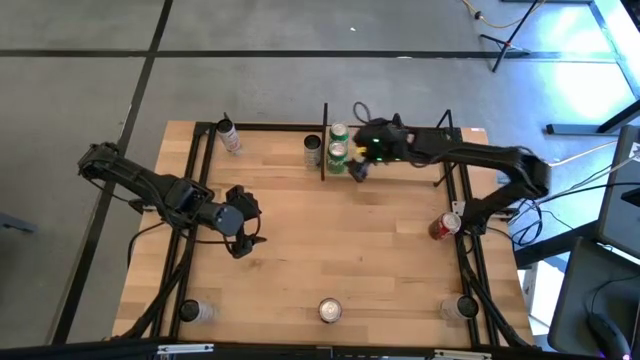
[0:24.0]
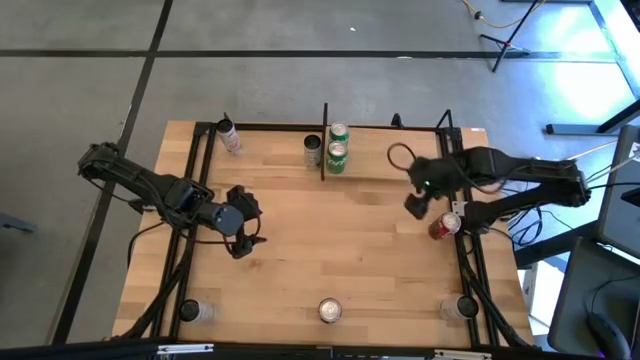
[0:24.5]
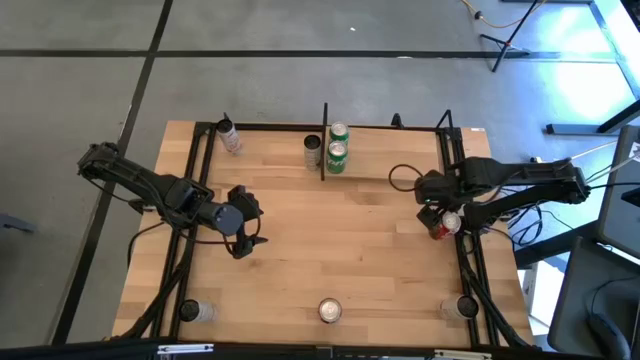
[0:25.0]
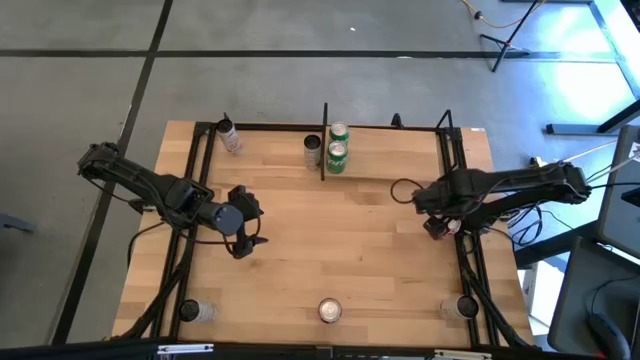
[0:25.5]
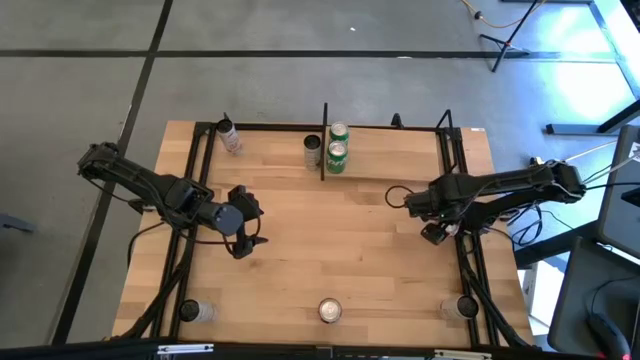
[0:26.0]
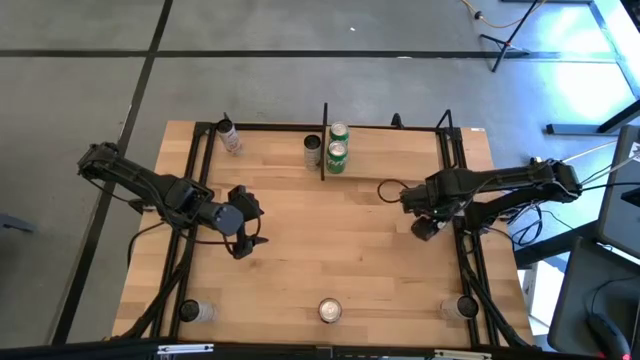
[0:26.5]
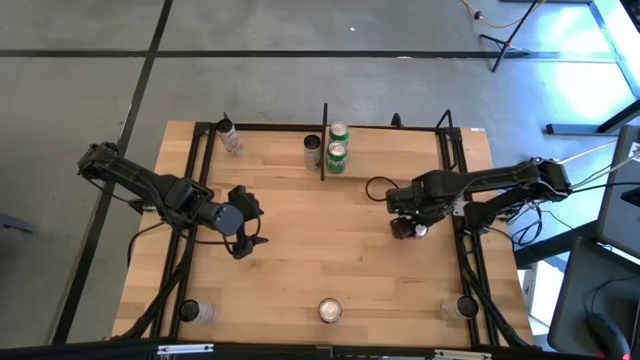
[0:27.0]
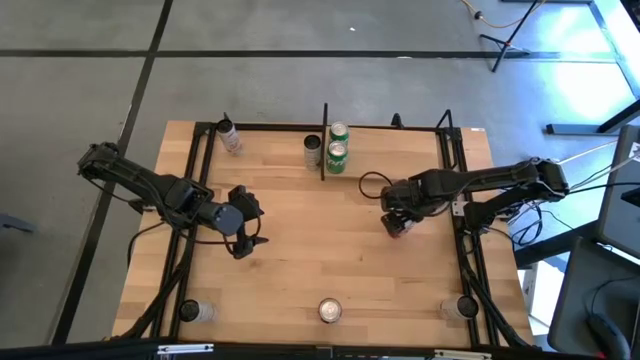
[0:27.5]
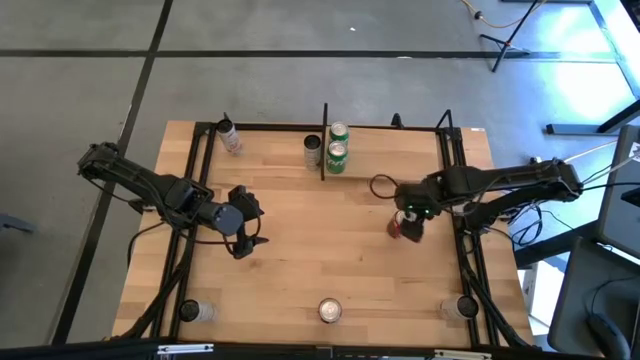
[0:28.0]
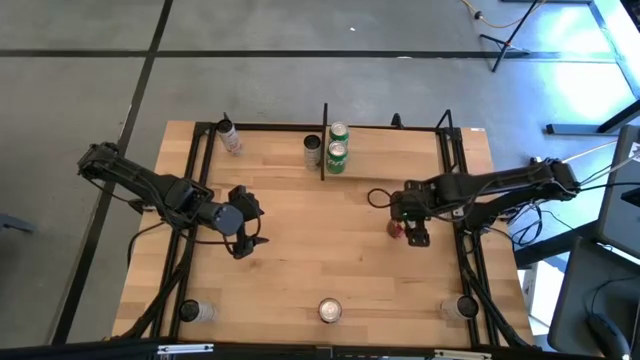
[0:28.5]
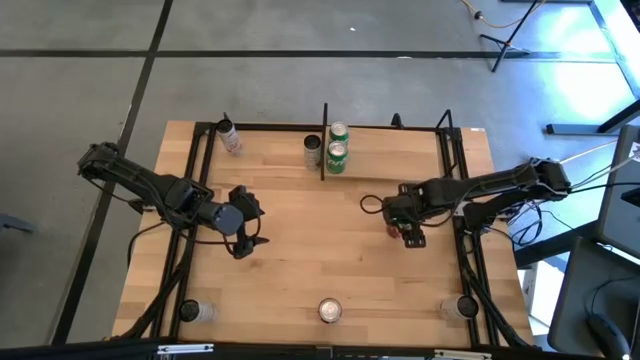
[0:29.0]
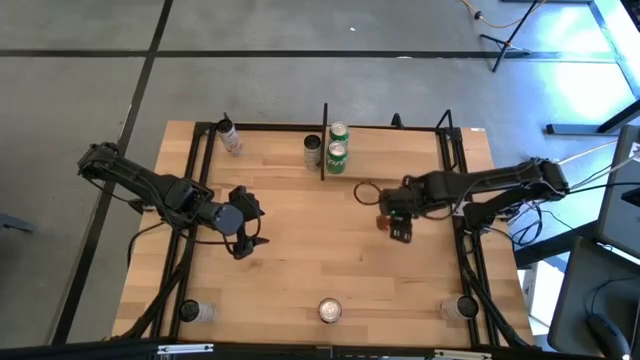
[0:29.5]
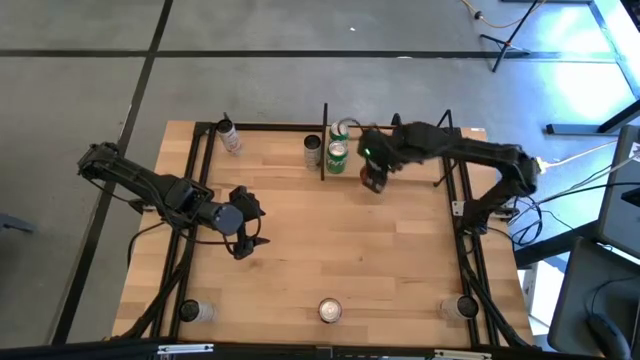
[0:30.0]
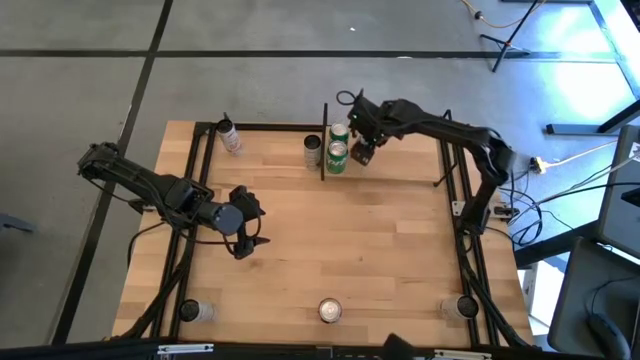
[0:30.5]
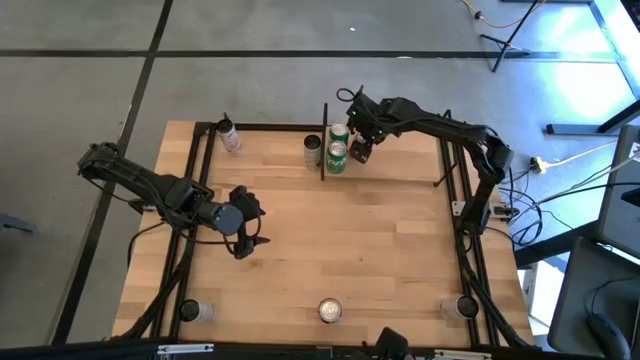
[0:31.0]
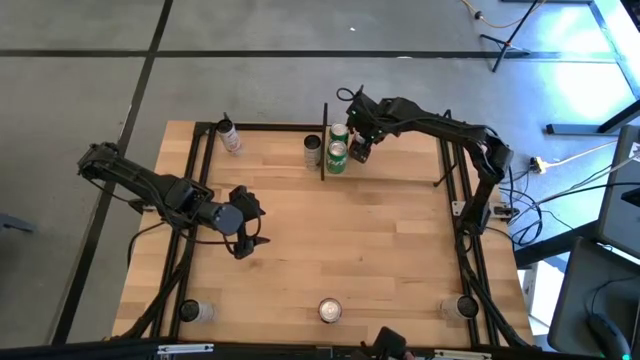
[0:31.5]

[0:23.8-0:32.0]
Task: Place canned beverage on shelf
Put the top red soda can on the shelf

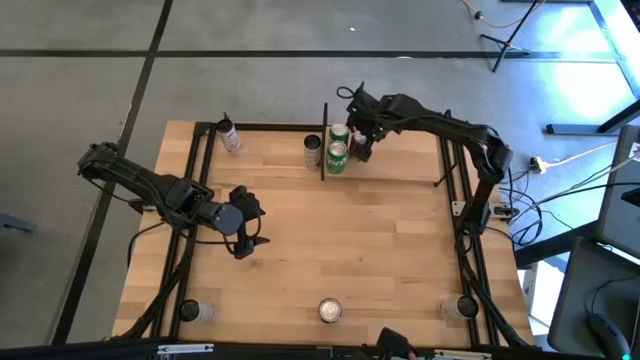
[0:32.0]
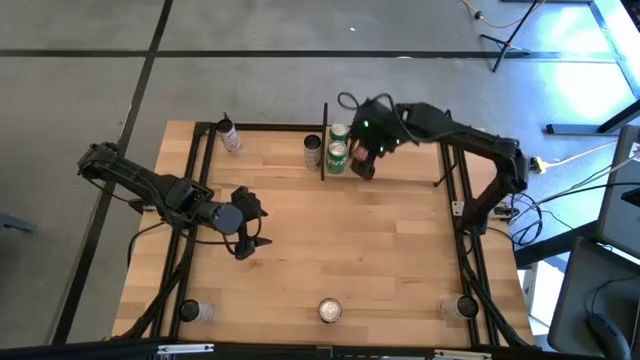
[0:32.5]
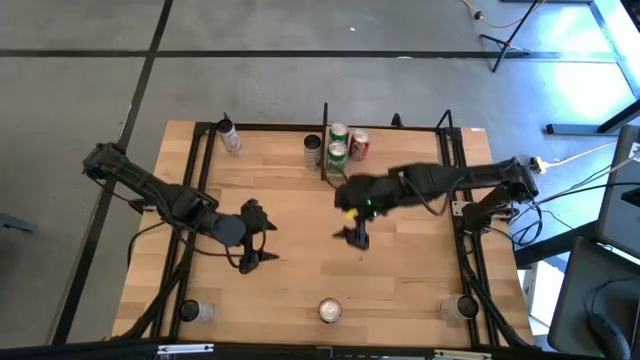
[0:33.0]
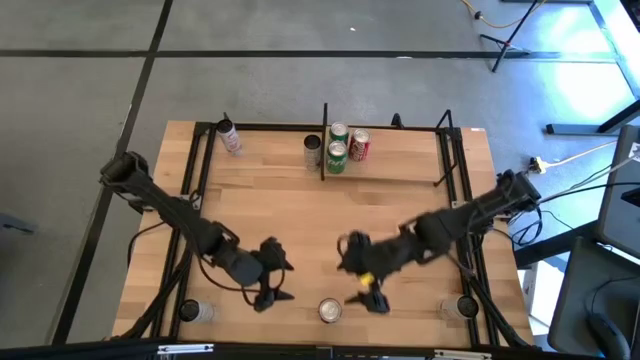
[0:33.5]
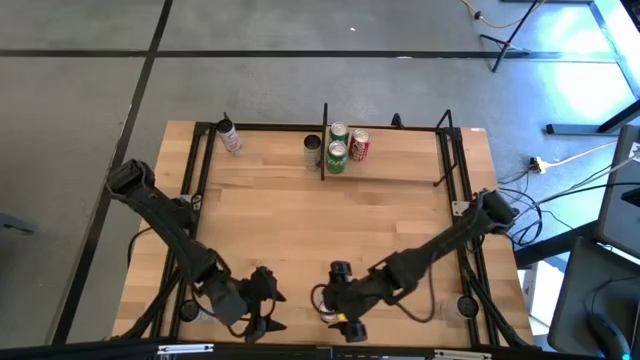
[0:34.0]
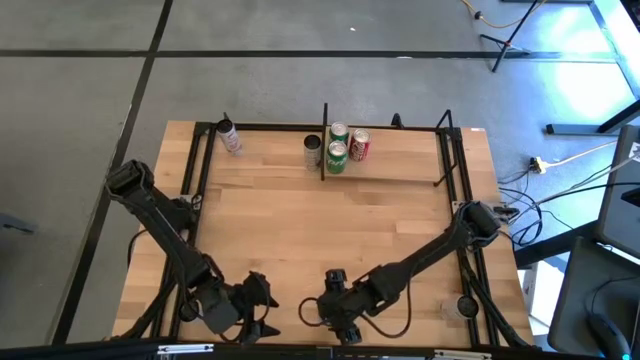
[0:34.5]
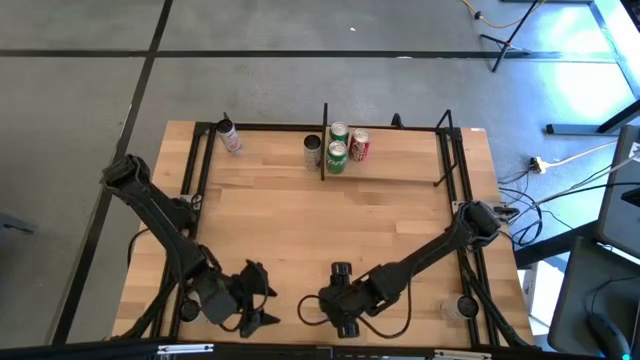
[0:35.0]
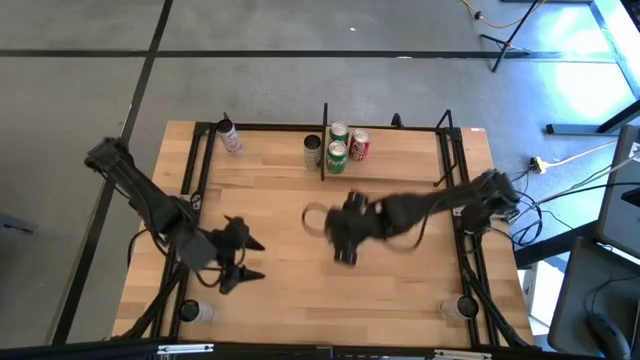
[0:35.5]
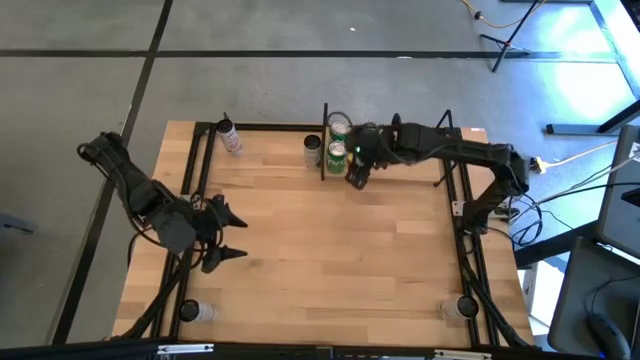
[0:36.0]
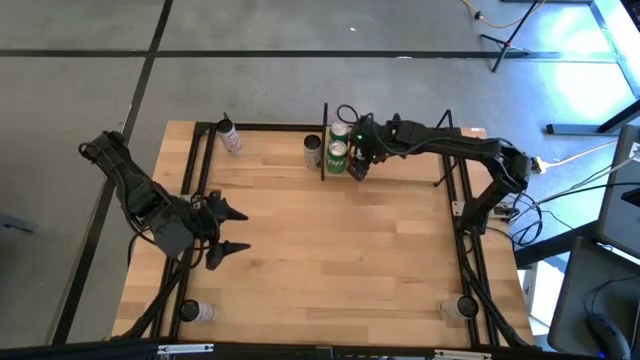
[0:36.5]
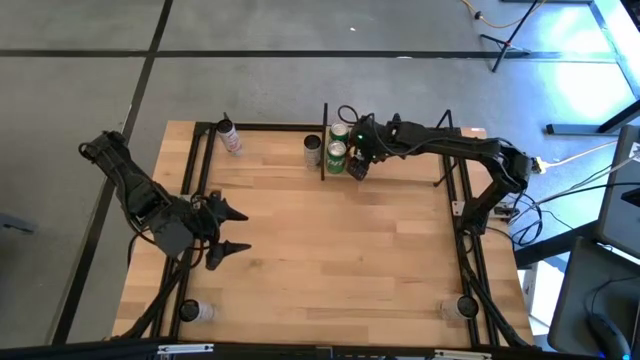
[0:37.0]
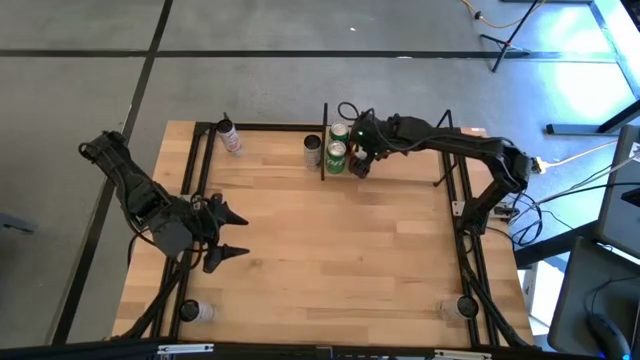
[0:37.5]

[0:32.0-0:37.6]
Put the red soda can on the shelf aligned with the other red soda can

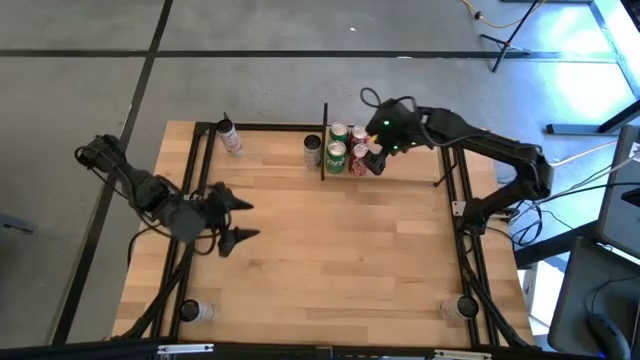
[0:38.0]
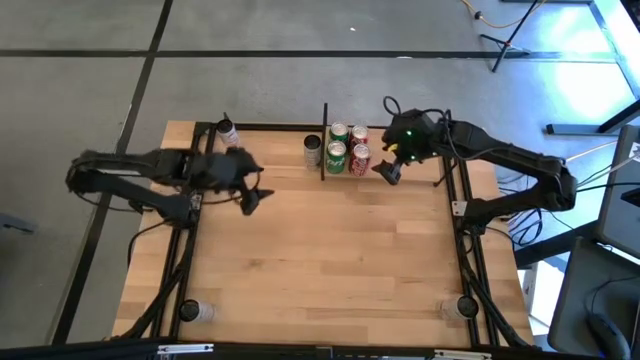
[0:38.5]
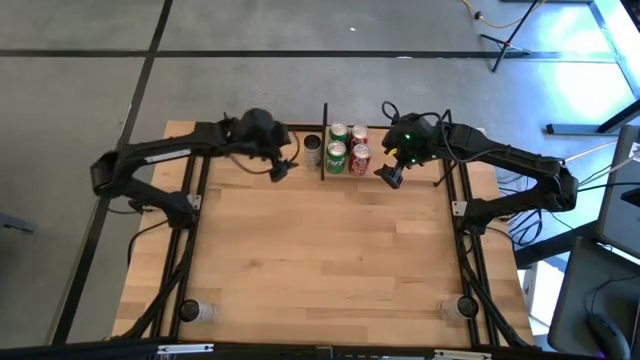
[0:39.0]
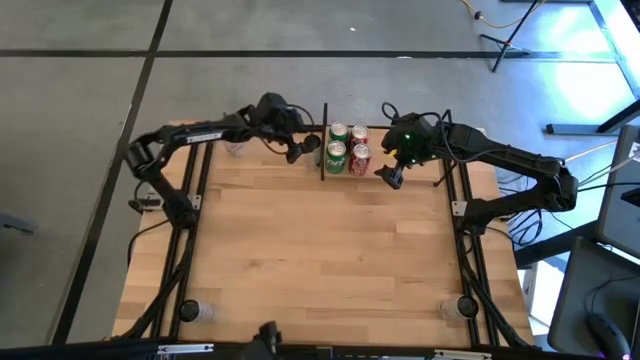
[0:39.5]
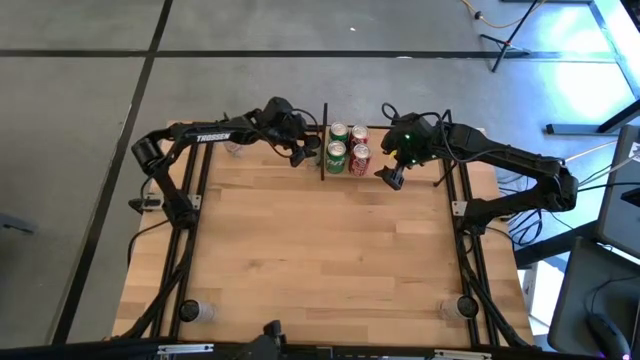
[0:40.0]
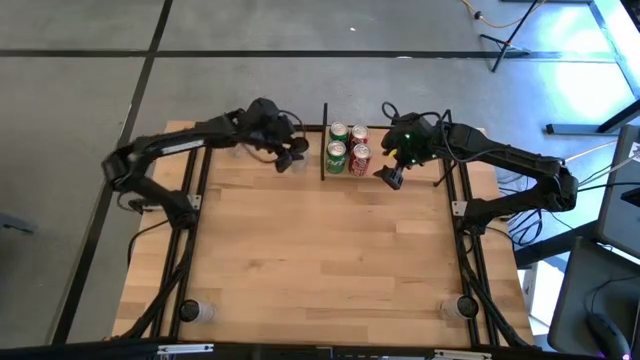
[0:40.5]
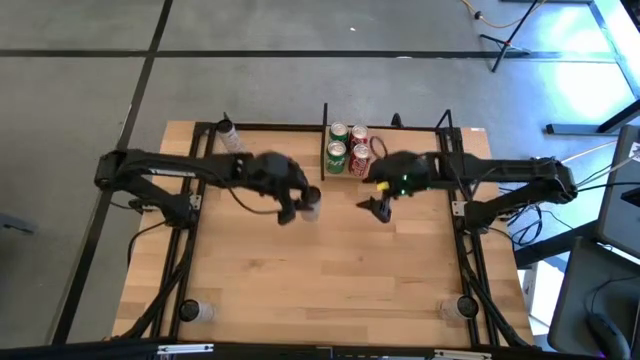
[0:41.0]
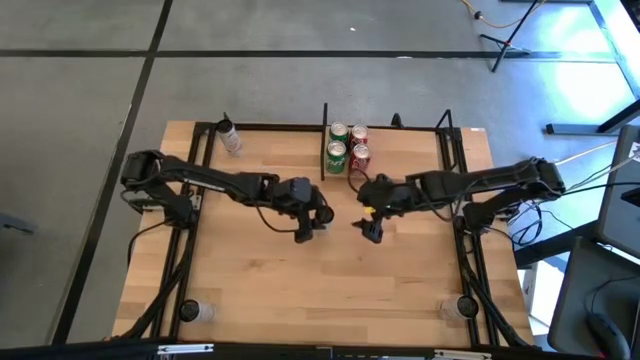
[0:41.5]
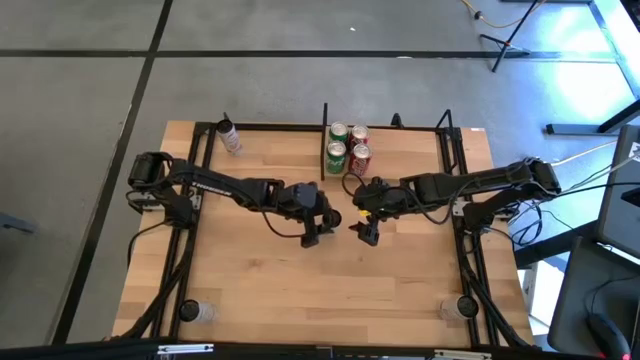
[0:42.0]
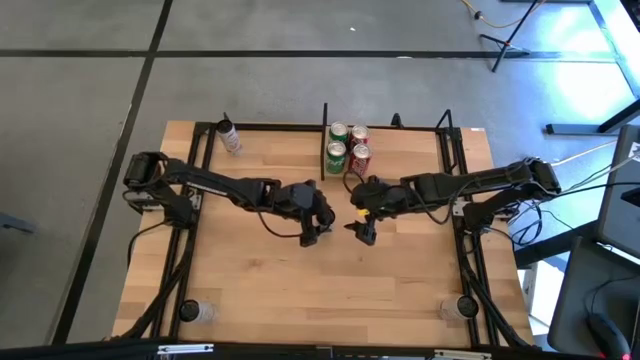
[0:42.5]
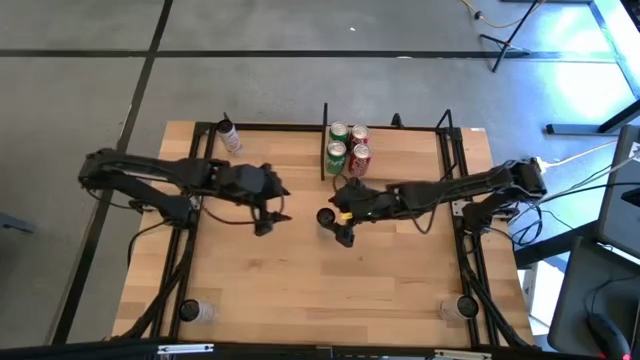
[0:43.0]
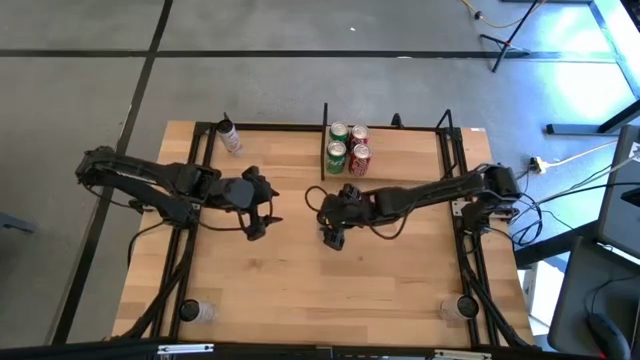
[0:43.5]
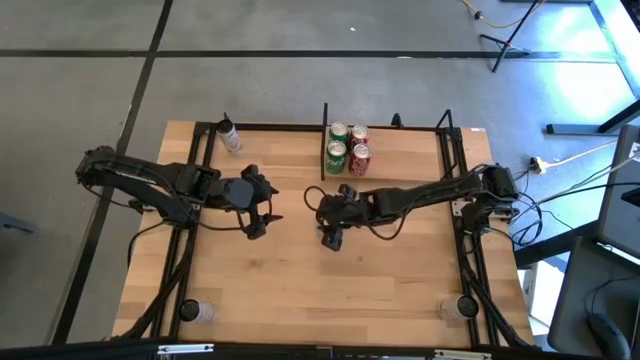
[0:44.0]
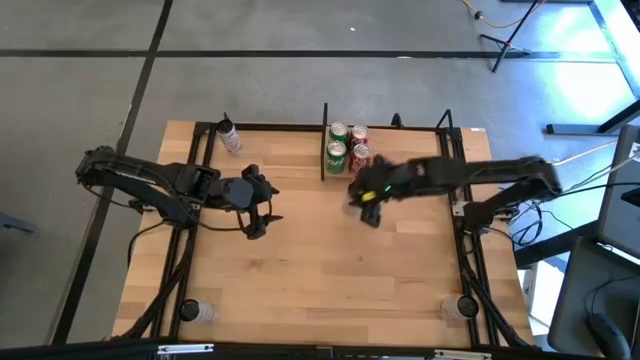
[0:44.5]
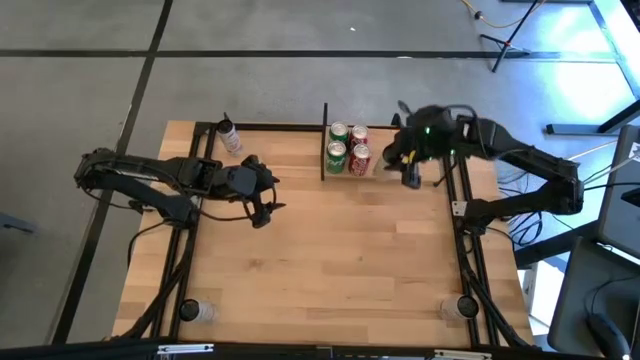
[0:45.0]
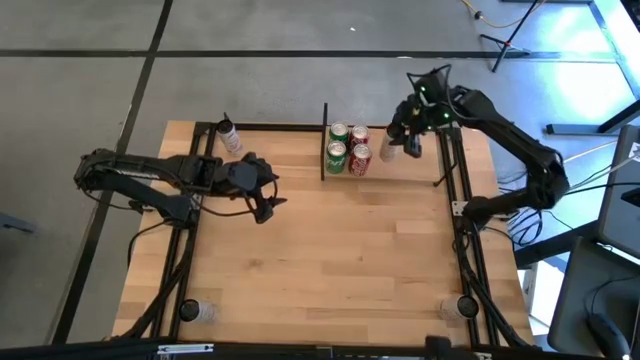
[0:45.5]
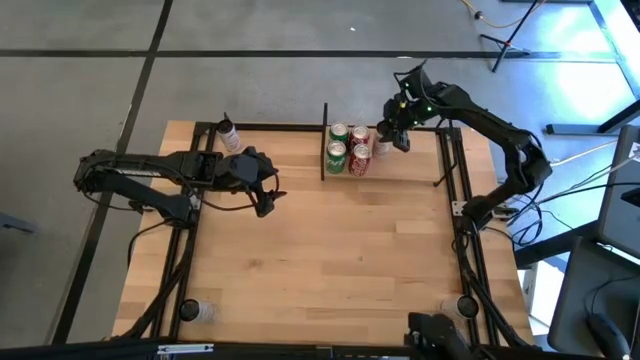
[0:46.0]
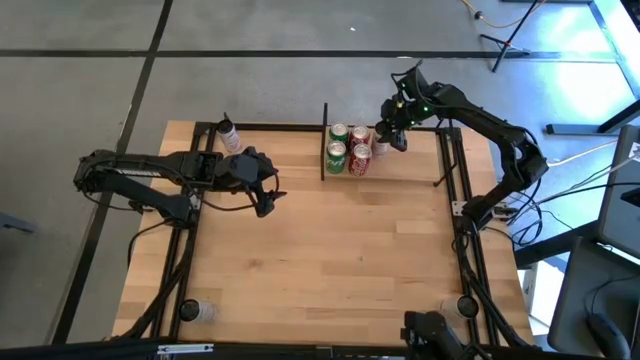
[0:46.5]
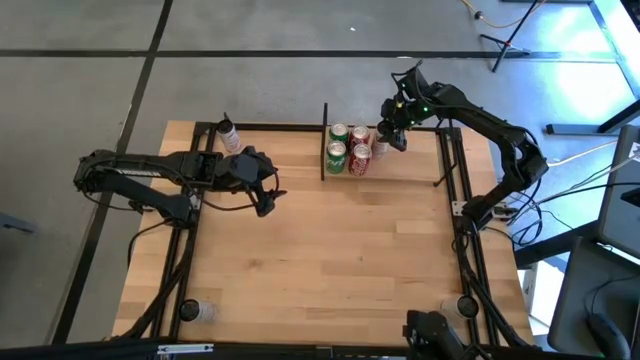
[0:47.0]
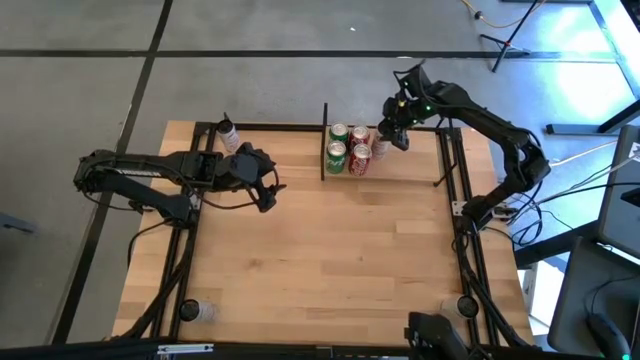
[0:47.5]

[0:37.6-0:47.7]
Put the top white yellow soda can on the shelf
